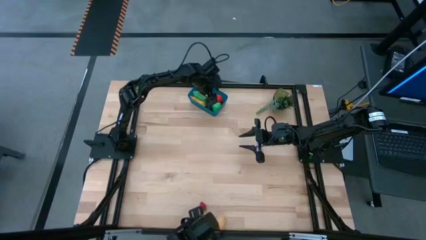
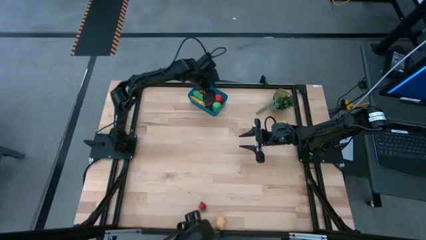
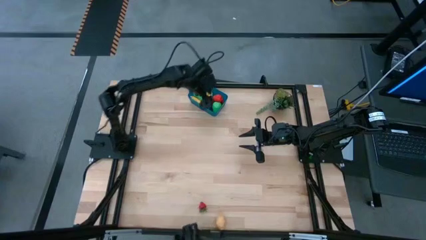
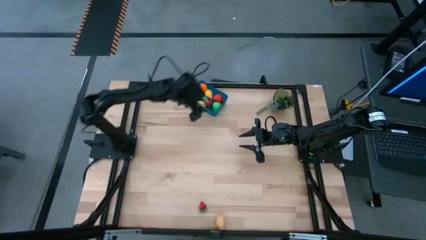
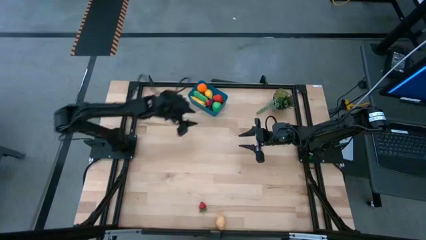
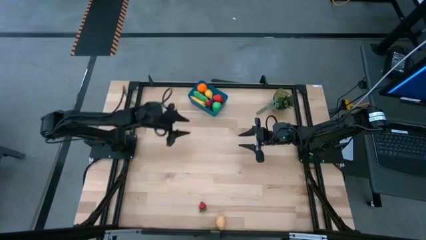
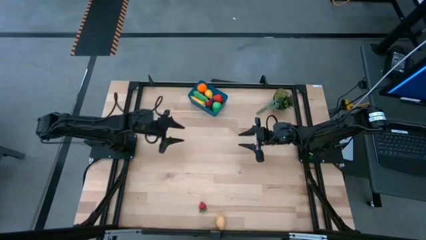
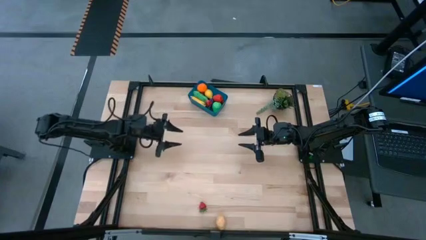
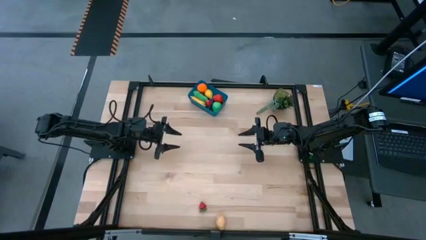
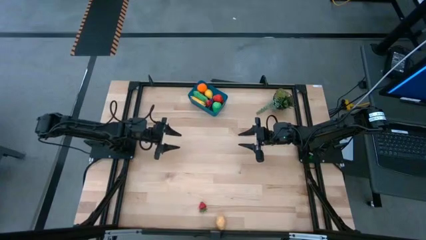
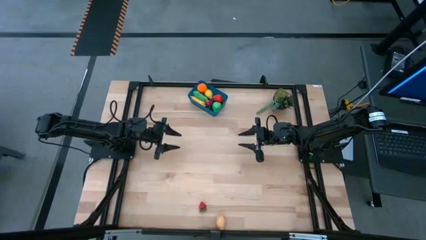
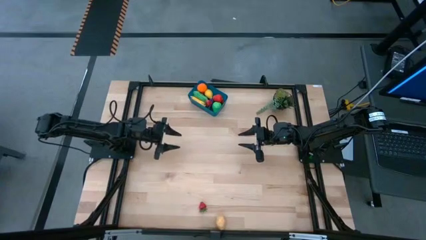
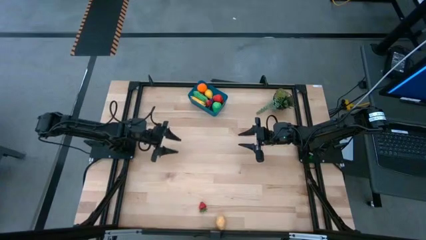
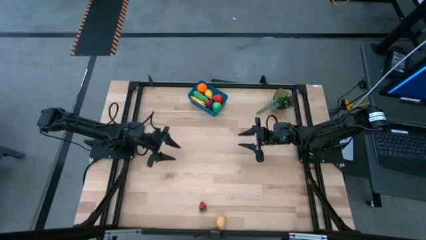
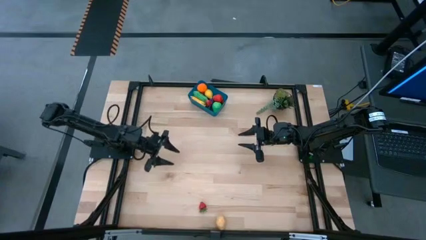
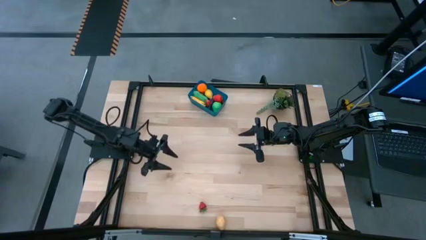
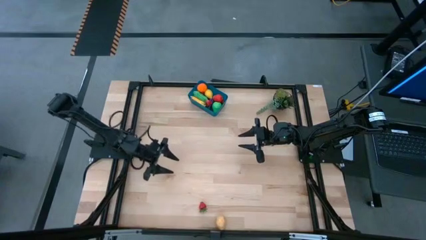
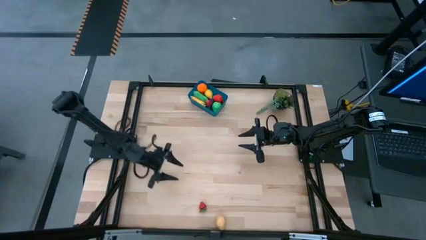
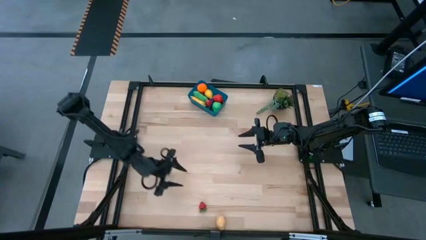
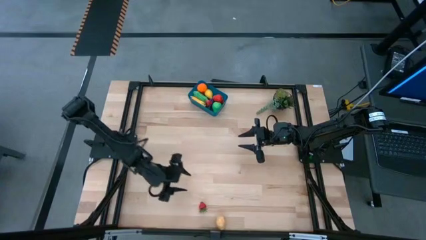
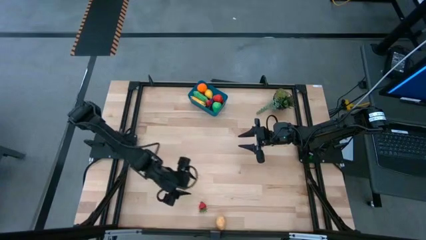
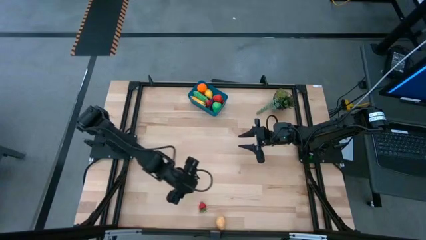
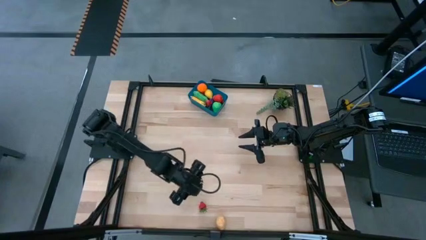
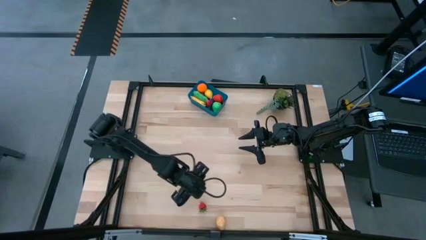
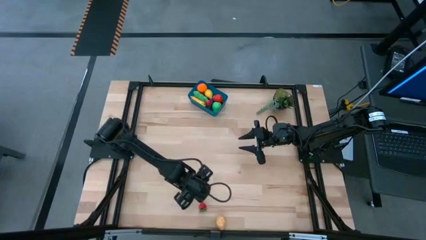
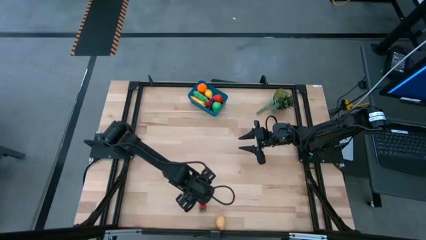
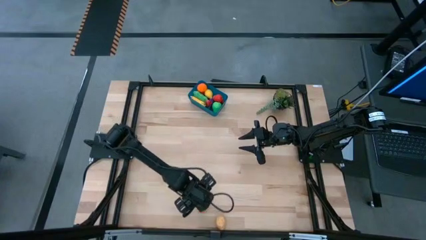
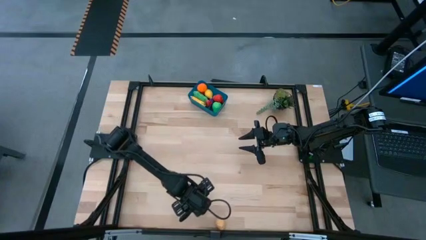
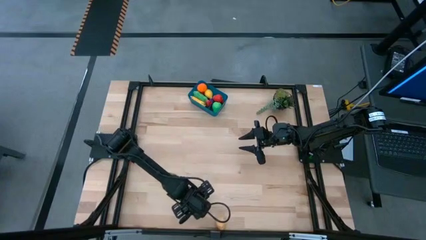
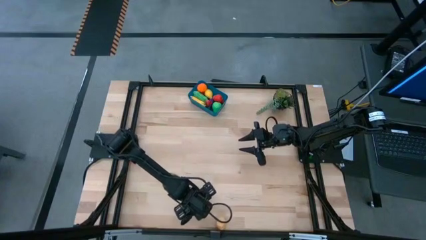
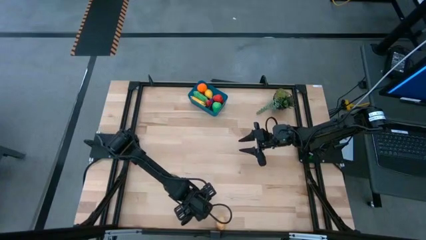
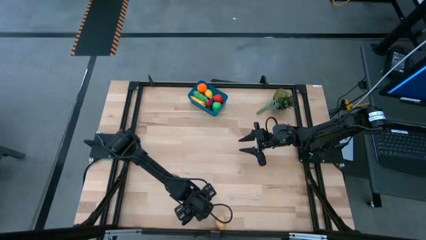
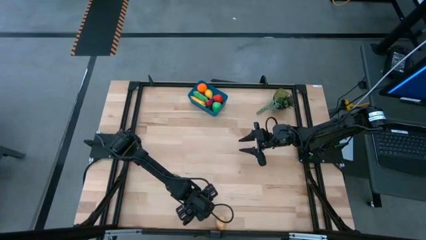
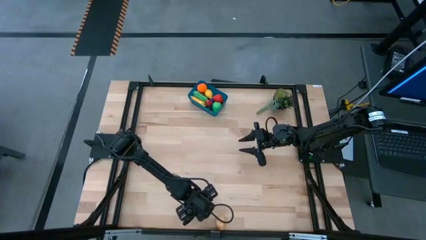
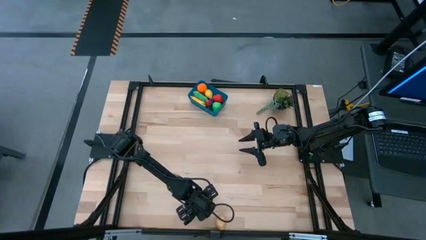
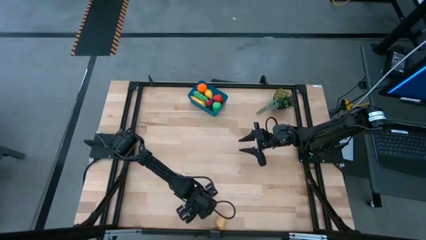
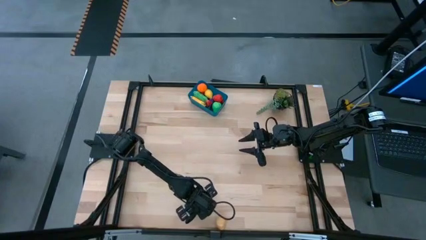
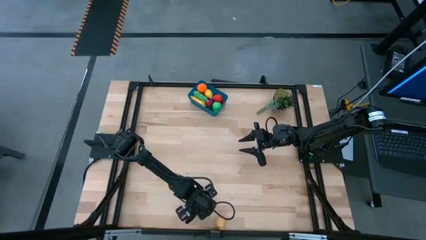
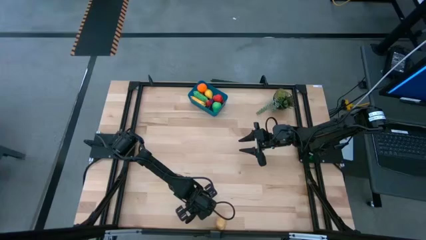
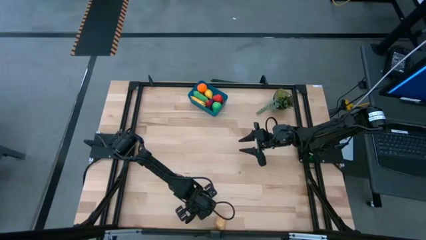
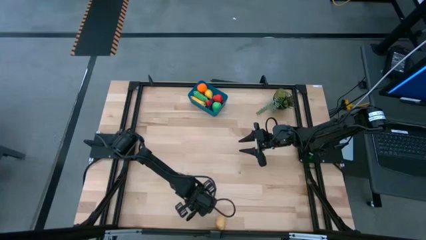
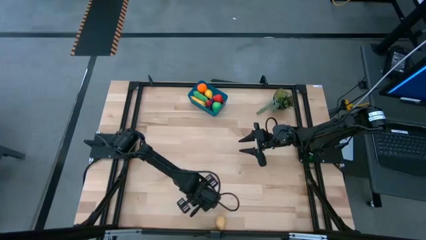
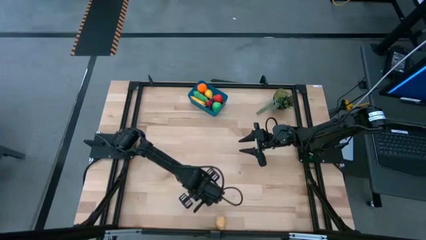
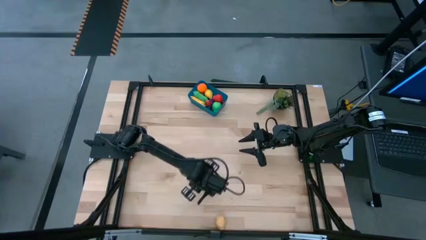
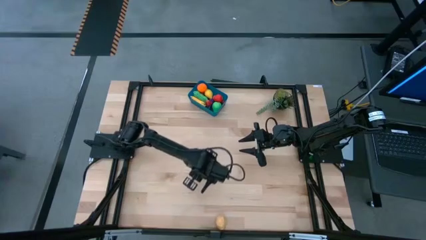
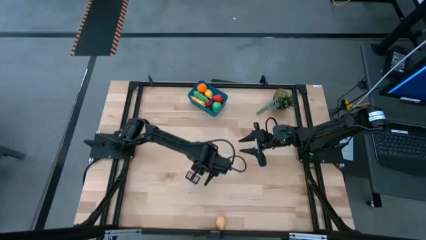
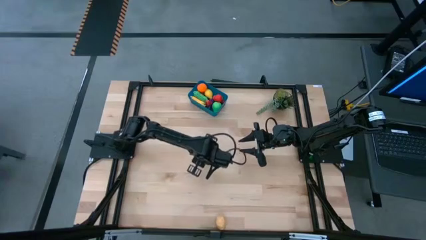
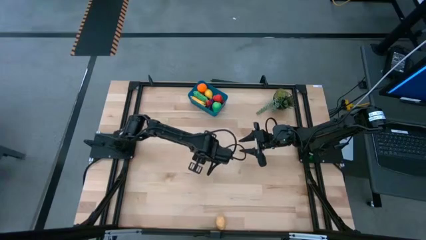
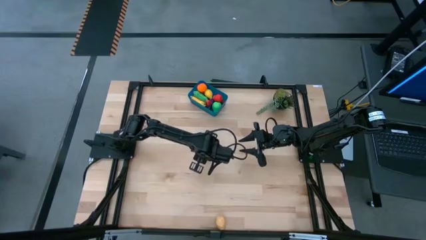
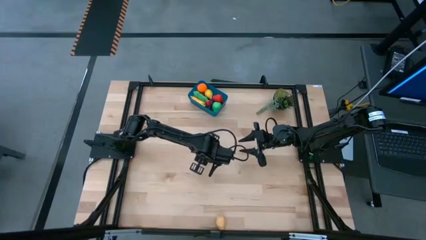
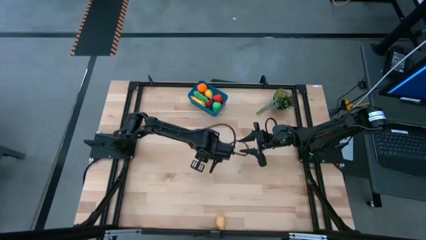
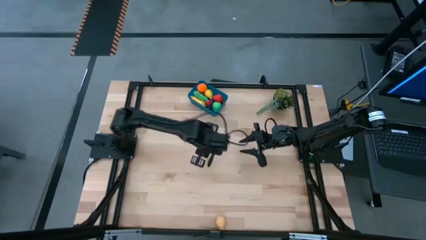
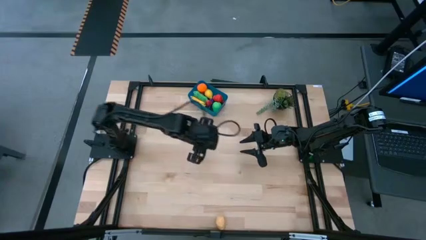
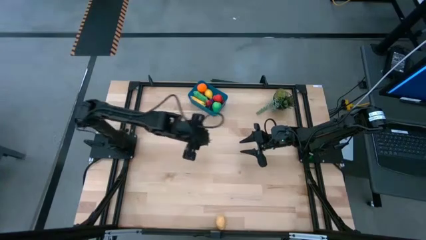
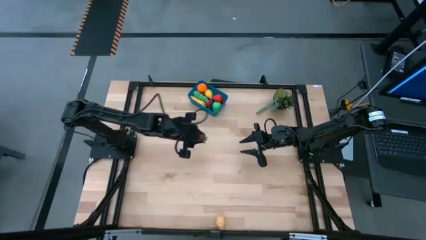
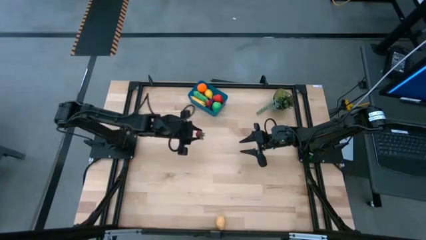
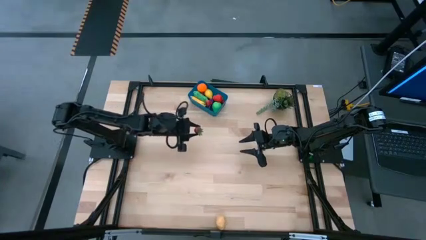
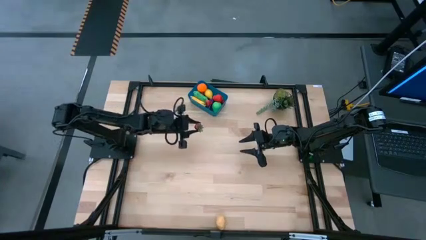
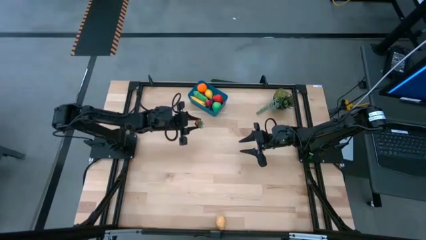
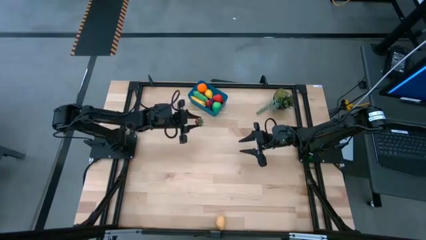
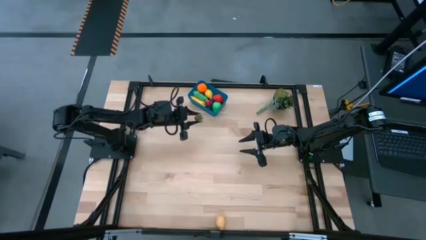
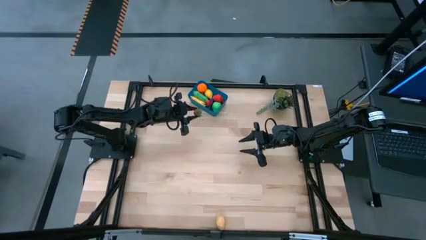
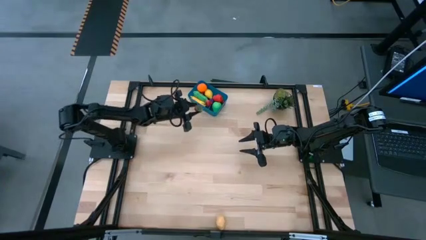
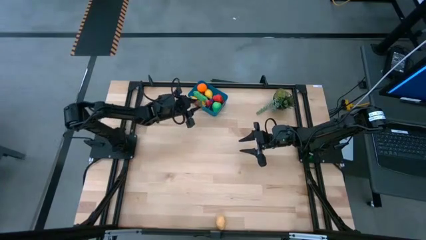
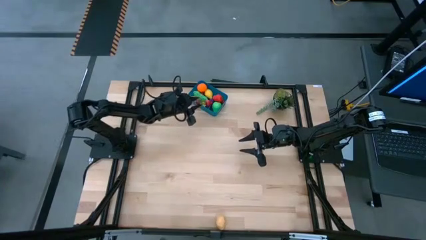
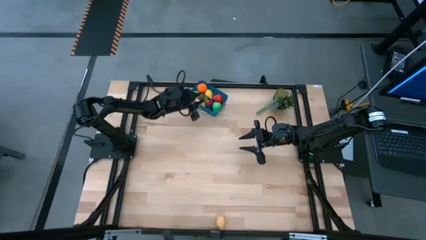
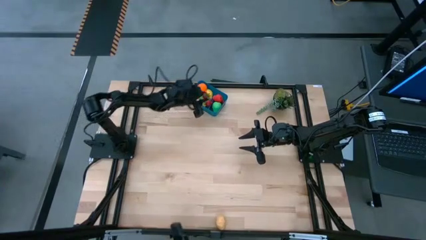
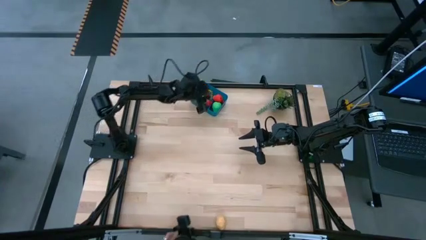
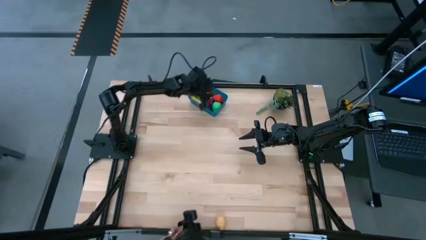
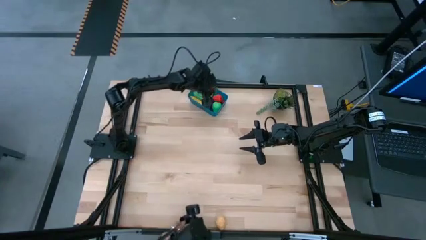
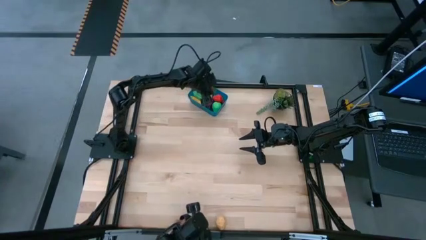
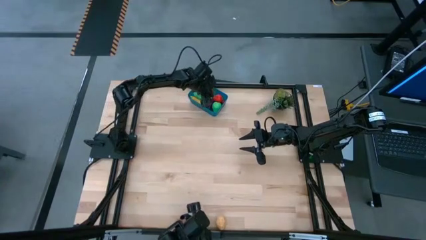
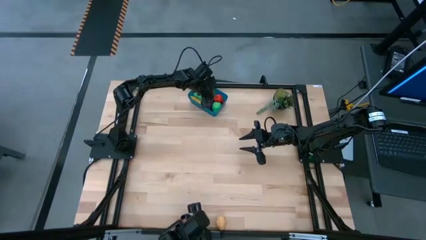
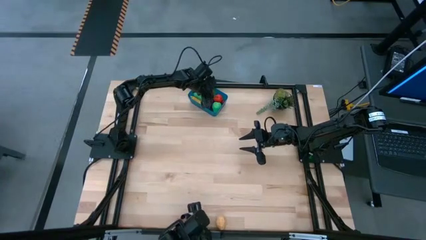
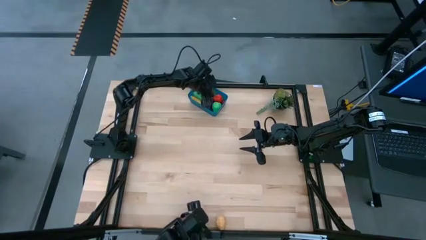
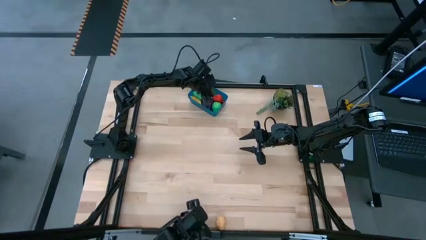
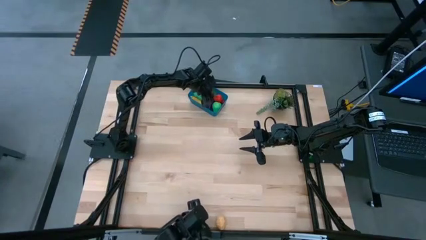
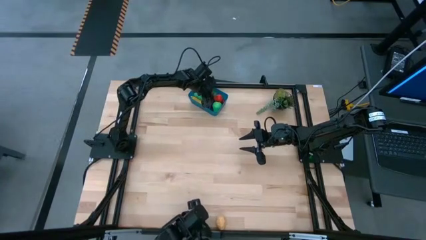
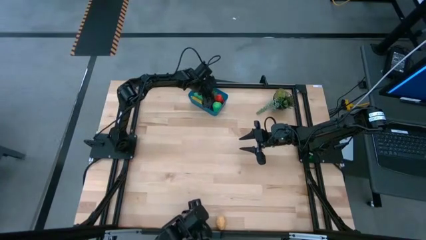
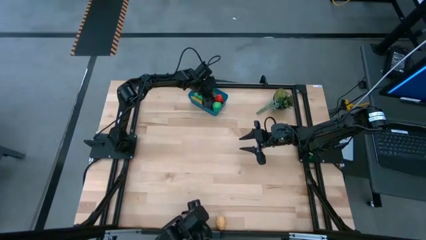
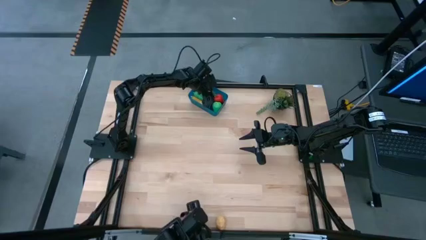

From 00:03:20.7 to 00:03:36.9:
Task: Pick and placing Produce into tupperware
Put the red strawberry into the blue bin
